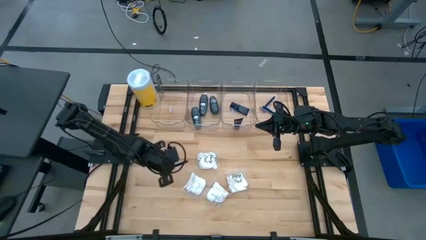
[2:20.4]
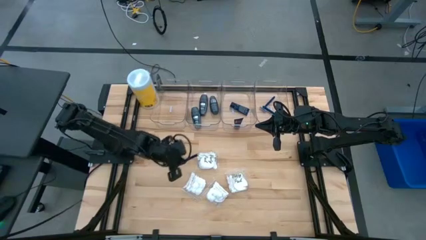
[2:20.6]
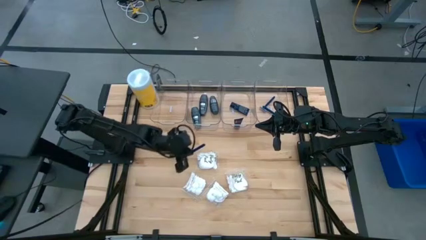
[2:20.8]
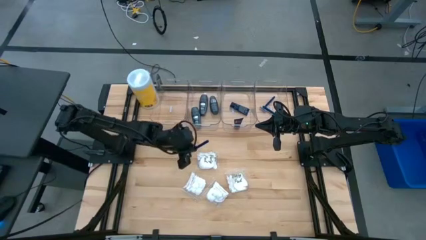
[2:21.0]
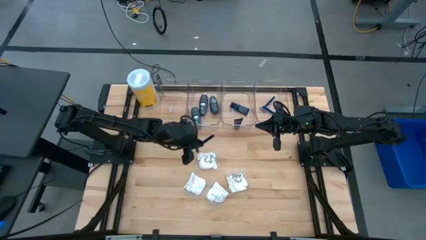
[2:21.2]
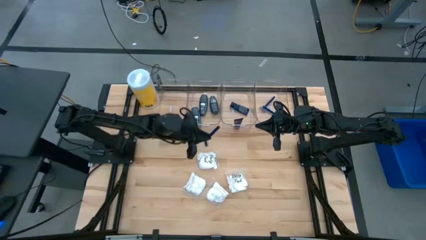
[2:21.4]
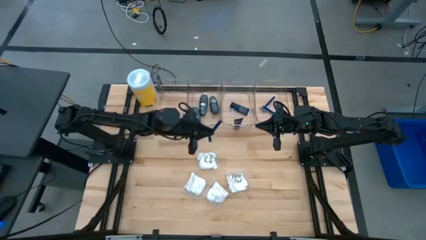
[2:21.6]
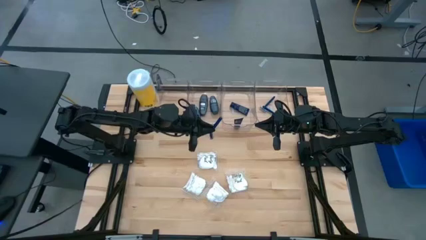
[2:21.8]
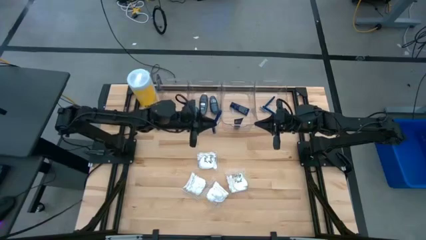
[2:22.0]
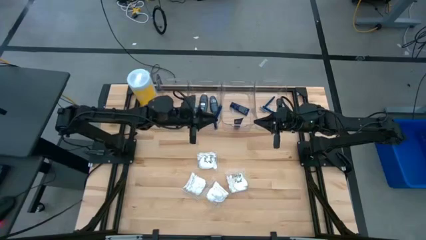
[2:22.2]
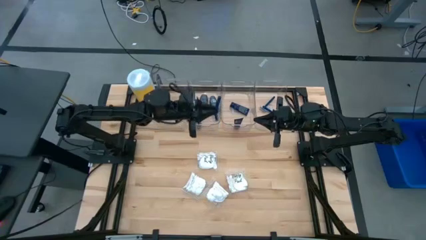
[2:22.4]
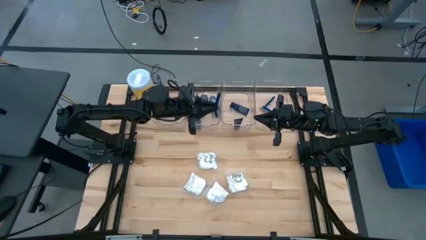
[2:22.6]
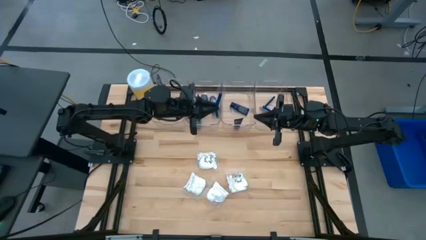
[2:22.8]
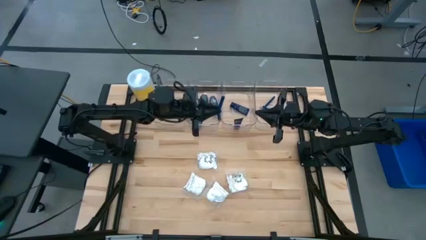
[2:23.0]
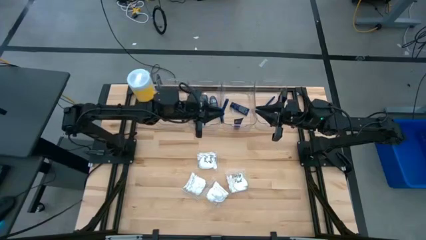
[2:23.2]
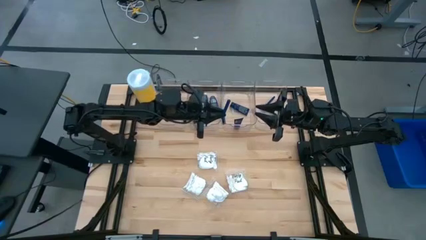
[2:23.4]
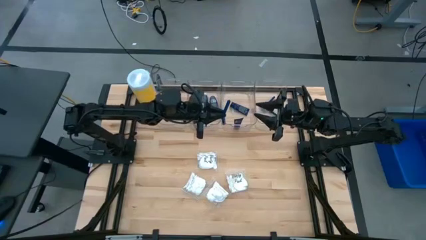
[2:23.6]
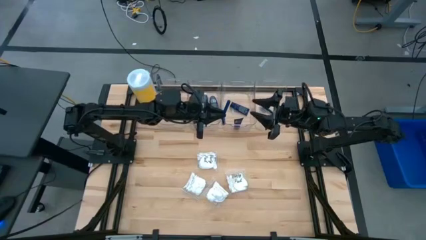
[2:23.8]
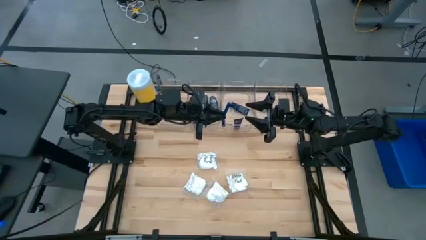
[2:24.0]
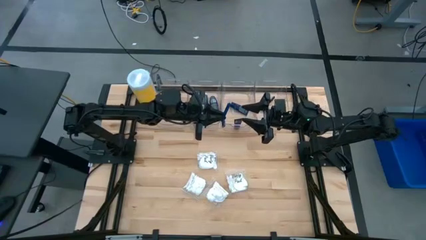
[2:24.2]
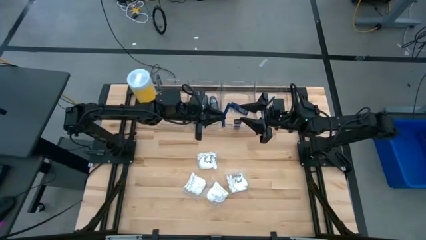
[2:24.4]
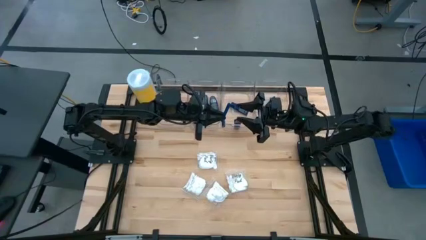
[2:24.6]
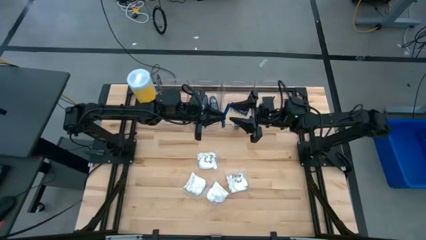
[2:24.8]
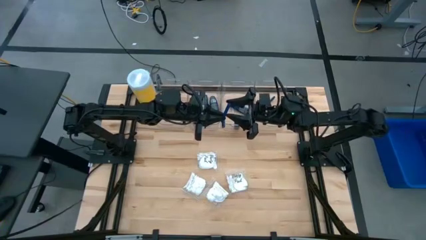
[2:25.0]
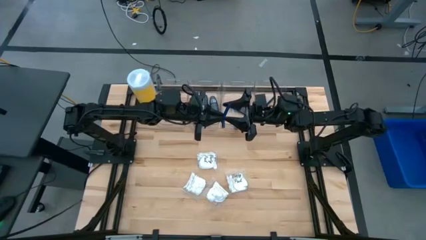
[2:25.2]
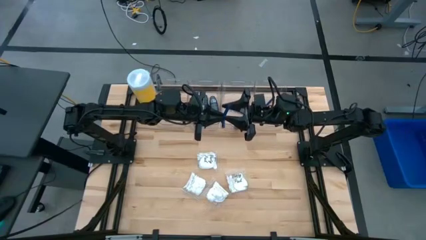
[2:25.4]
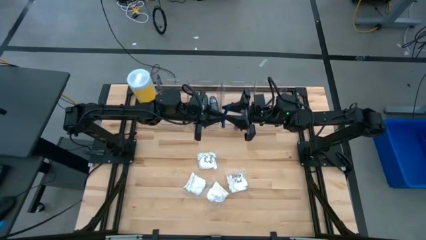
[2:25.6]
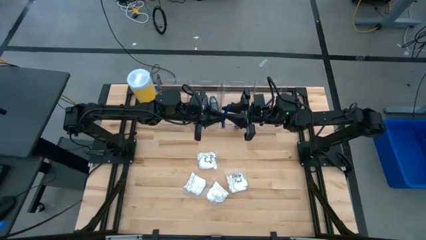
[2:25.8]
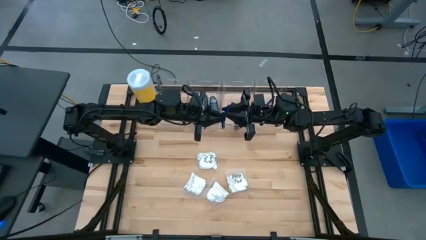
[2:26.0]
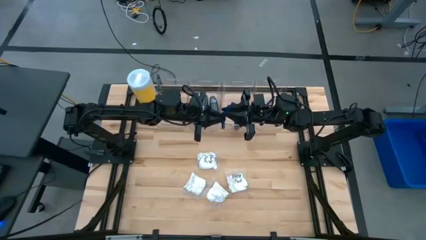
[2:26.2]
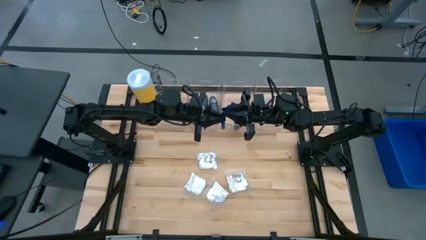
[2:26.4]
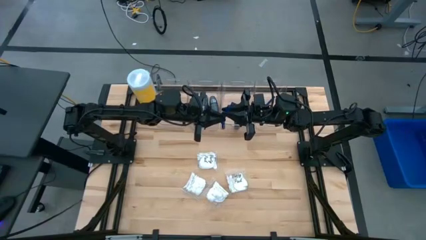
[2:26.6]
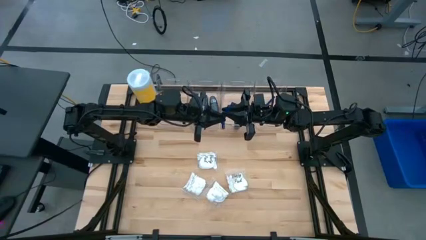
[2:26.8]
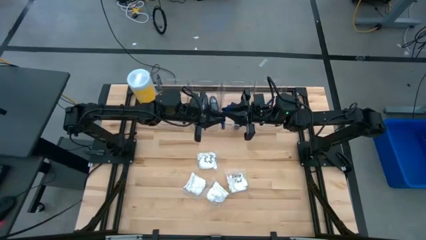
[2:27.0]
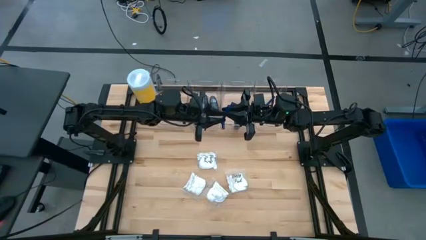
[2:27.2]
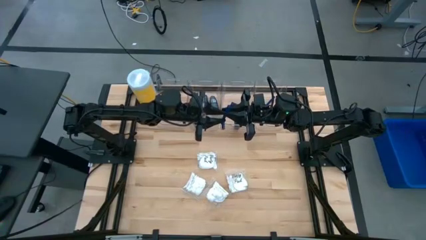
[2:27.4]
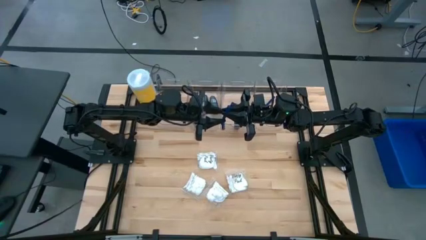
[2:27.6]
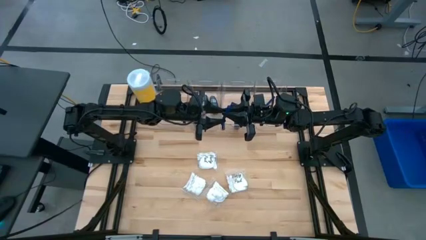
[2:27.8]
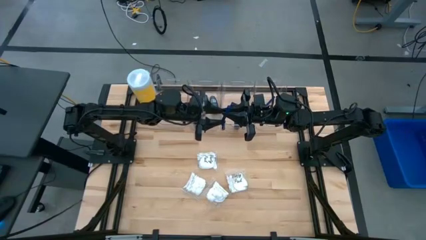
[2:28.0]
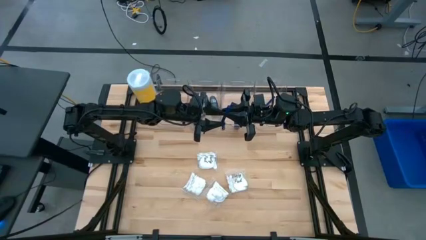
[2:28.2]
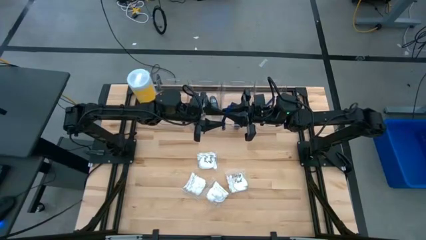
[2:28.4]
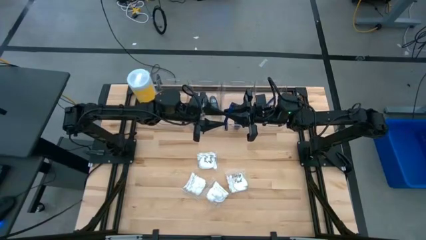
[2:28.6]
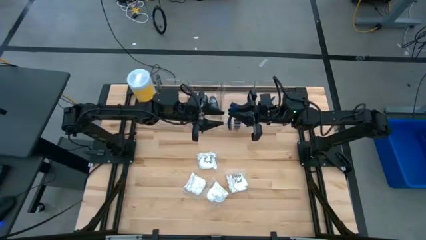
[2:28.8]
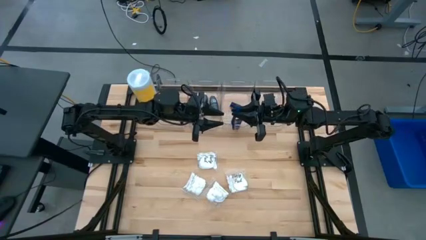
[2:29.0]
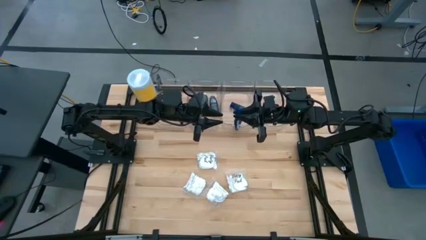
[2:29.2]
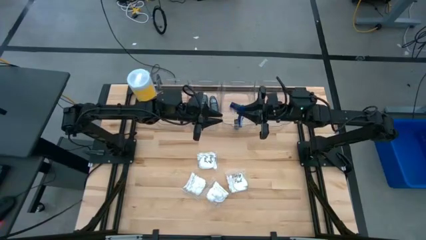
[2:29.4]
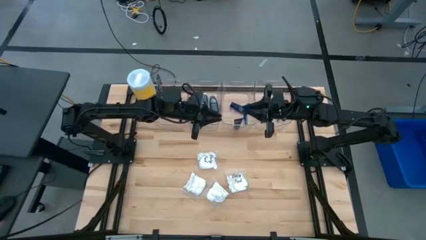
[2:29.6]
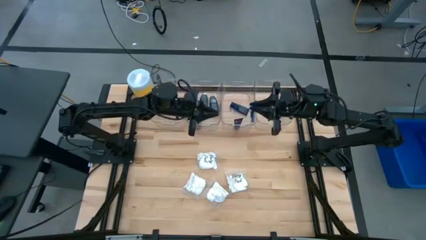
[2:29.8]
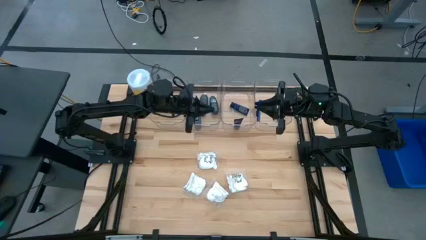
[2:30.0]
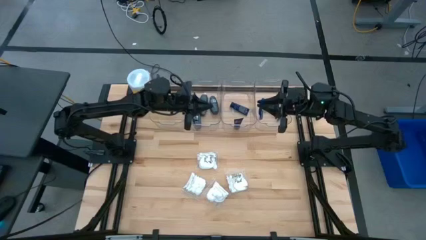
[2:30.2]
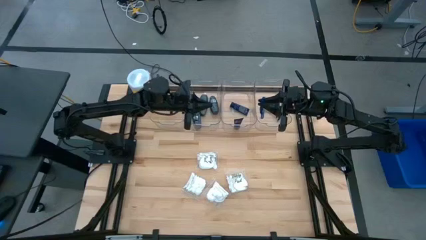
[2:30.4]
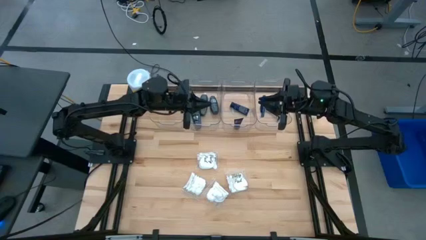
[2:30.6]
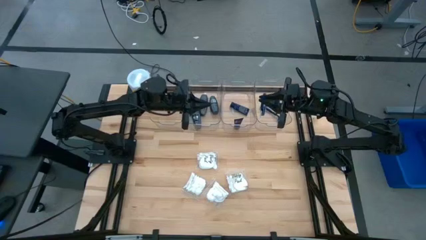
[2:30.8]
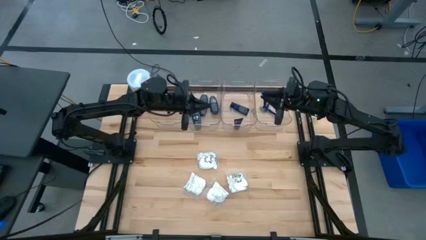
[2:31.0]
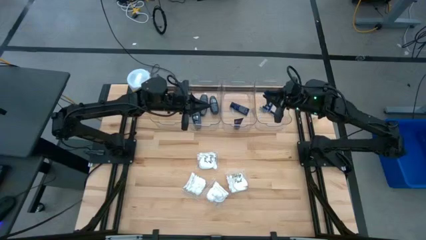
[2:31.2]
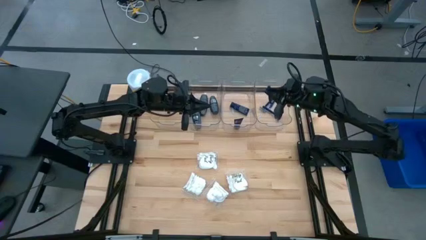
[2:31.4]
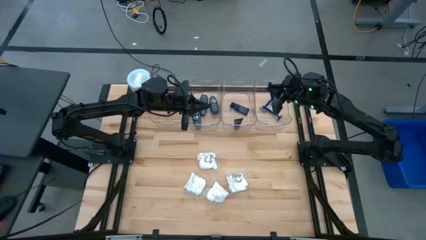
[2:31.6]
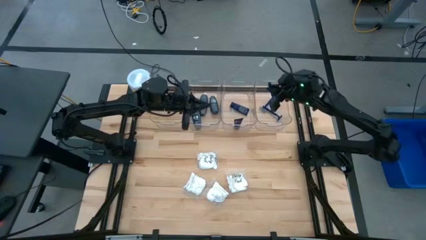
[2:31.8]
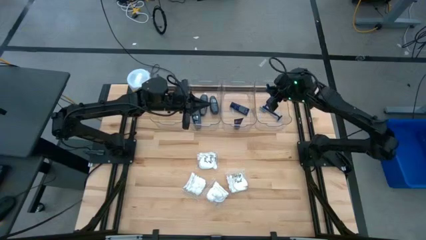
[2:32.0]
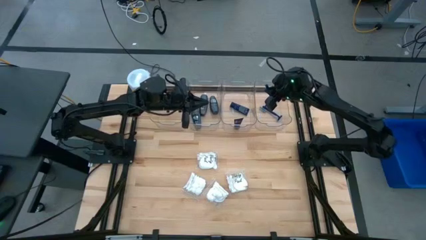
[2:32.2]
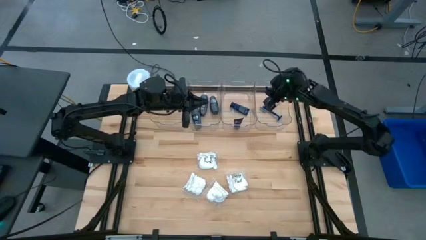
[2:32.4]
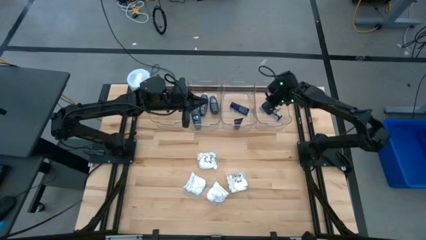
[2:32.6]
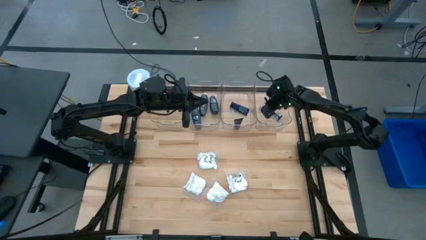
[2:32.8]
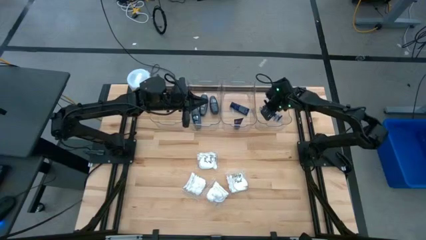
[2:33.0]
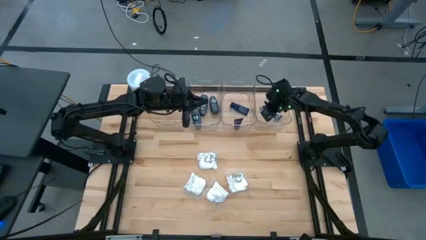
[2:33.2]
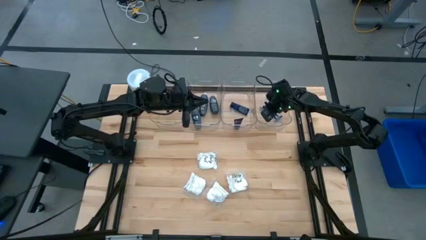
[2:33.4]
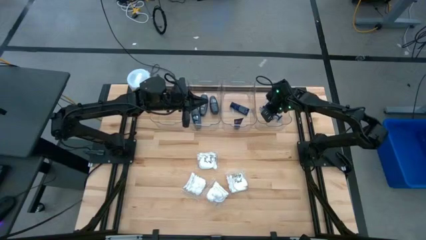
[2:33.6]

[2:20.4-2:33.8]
Task: Pick & Place Travel size toiletries
Put the blue razor into the right transparent bin

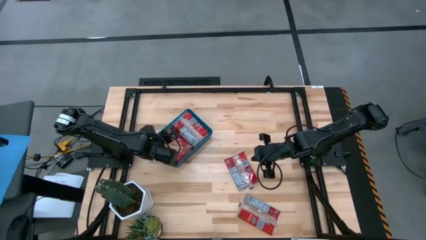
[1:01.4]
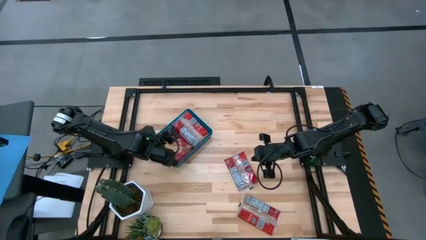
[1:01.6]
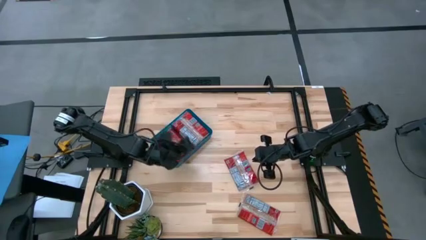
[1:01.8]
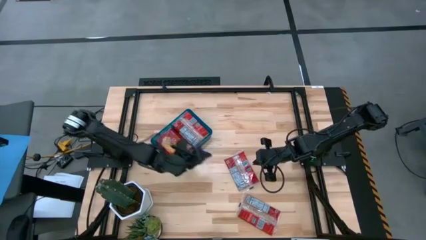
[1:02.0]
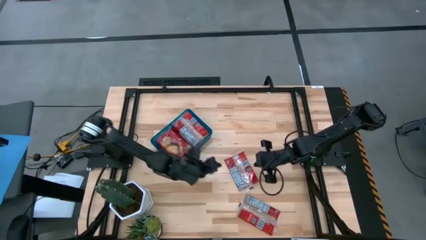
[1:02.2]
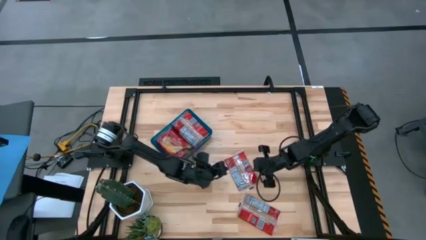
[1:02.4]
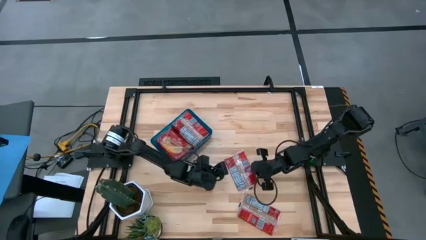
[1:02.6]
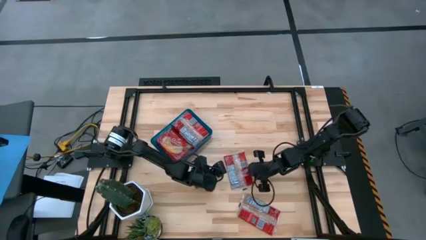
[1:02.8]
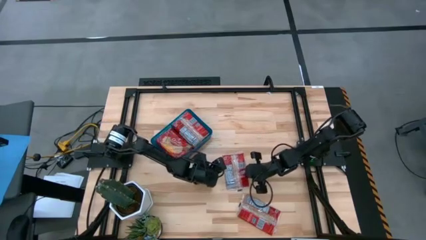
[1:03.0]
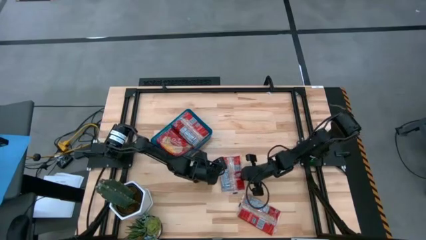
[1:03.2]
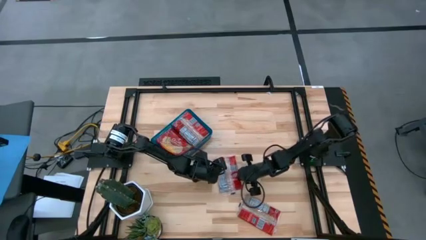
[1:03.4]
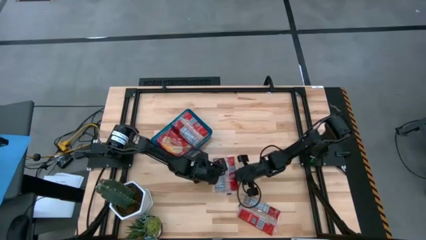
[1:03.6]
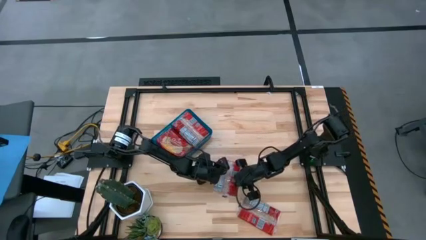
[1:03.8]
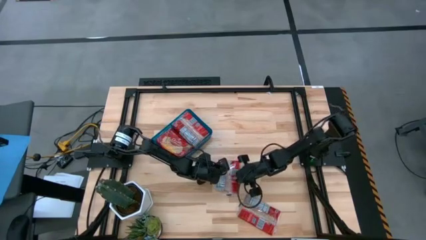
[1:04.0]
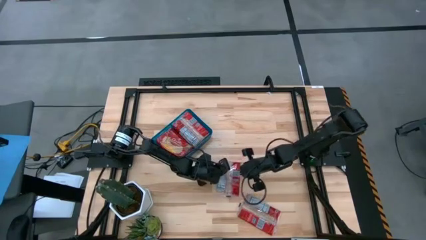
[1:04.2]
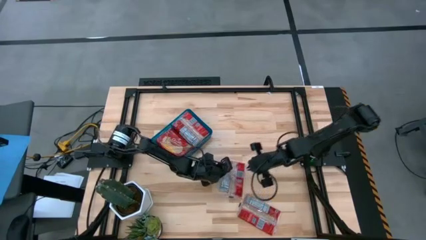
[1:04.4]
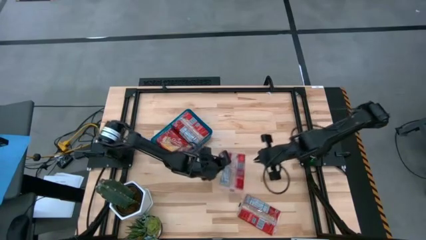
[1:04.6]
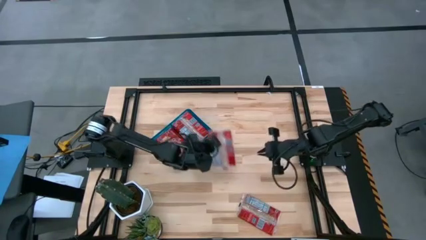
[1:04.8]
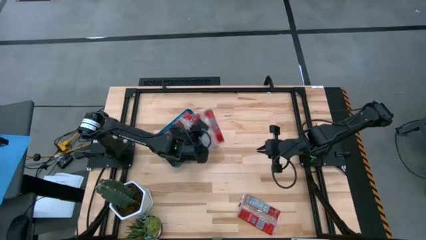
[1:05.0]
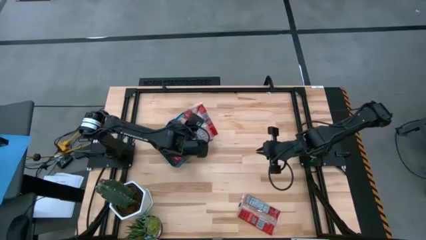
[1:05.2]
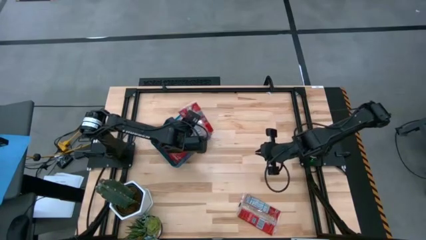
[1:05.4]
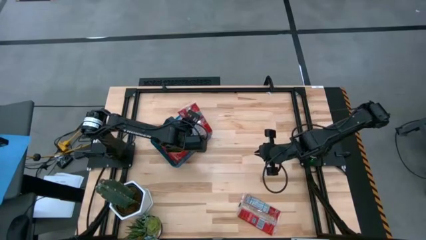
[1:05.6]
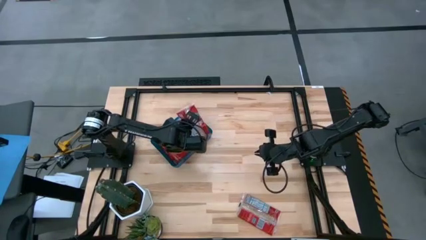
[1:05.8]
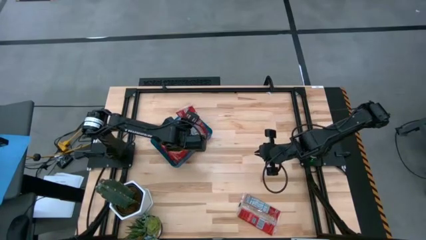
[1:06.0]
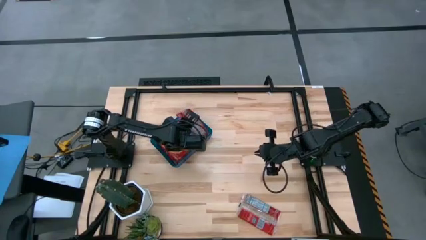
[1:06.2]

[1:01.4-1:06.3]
Task: Sort popcorn bags into baskets
Put the red popcorn bag into the blue bin
